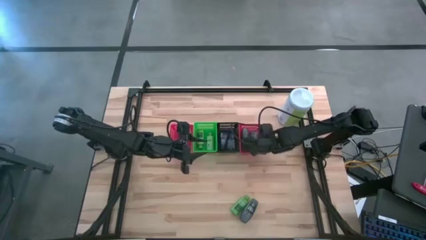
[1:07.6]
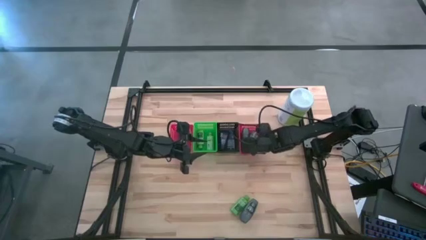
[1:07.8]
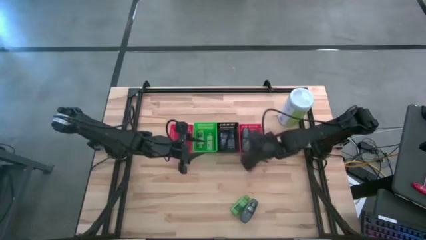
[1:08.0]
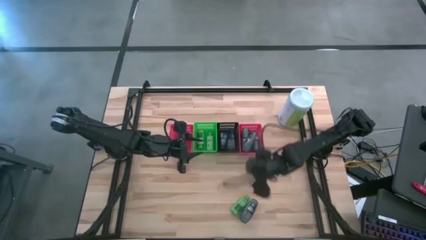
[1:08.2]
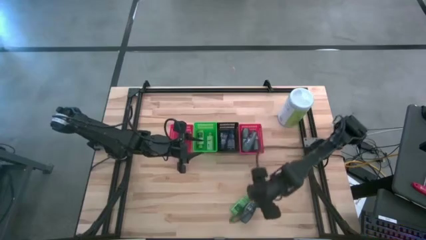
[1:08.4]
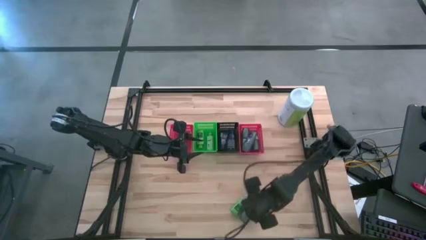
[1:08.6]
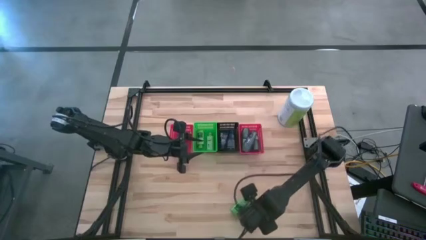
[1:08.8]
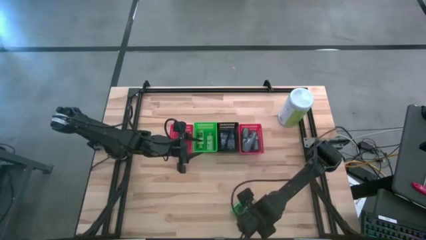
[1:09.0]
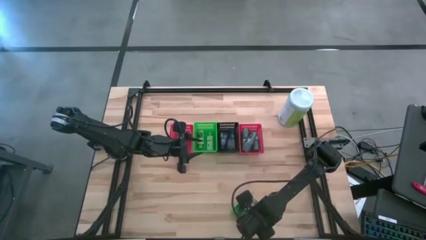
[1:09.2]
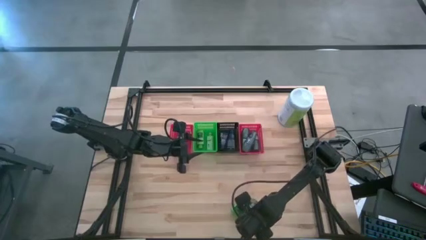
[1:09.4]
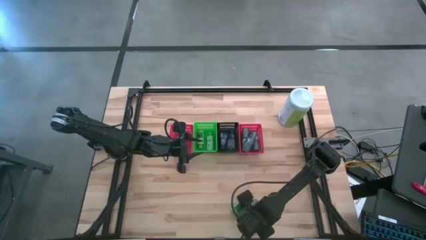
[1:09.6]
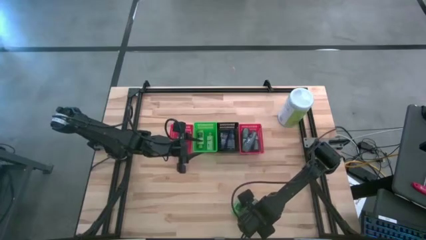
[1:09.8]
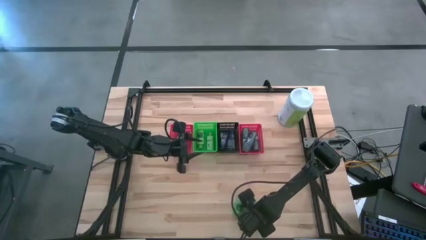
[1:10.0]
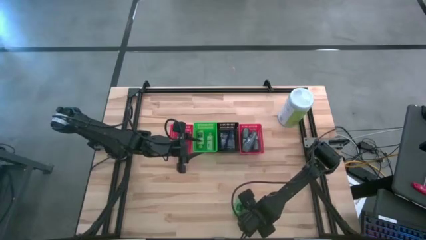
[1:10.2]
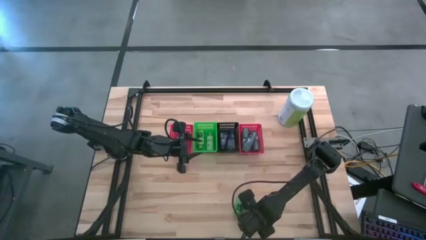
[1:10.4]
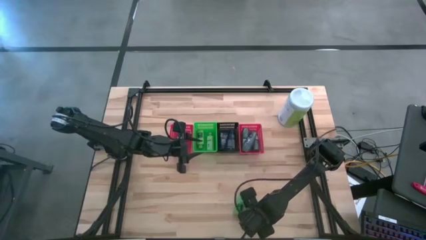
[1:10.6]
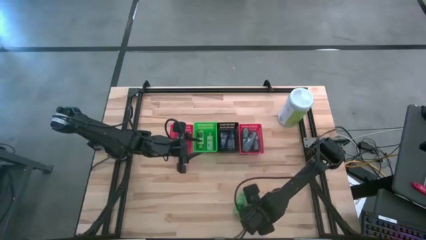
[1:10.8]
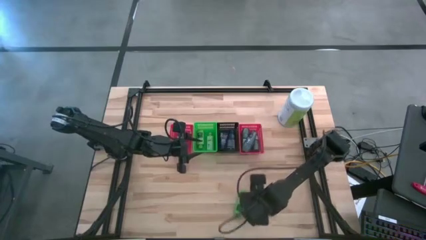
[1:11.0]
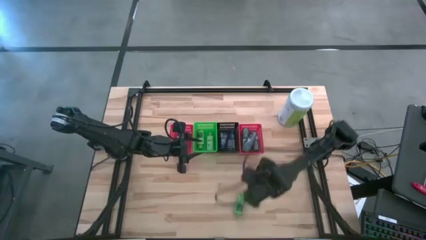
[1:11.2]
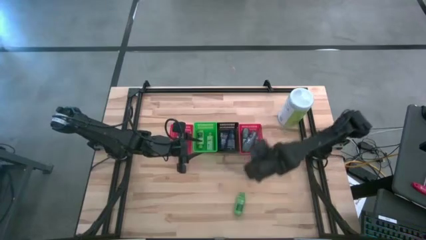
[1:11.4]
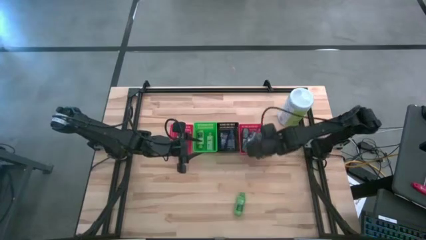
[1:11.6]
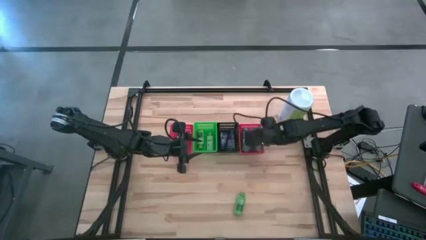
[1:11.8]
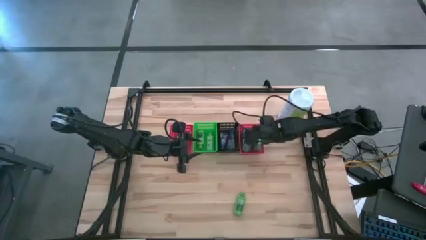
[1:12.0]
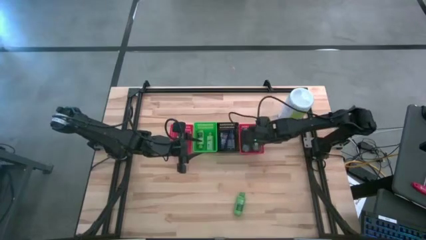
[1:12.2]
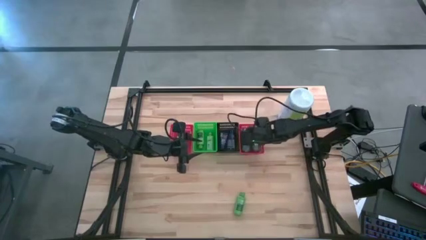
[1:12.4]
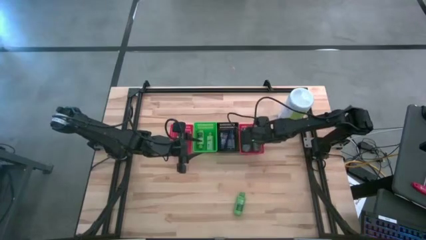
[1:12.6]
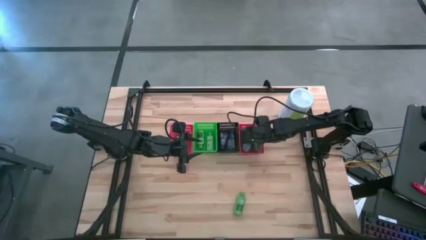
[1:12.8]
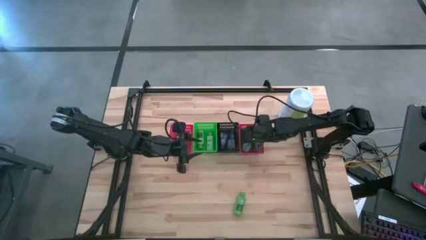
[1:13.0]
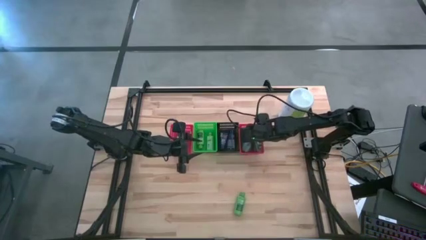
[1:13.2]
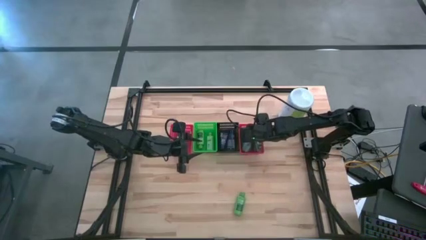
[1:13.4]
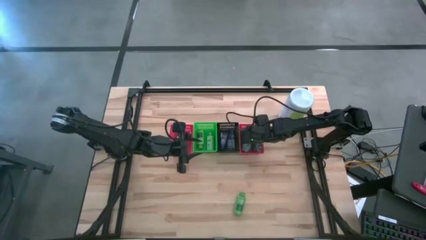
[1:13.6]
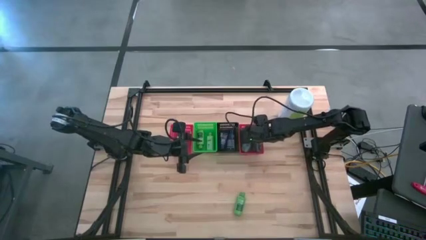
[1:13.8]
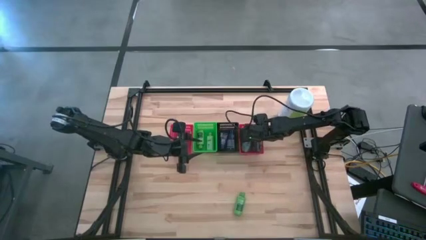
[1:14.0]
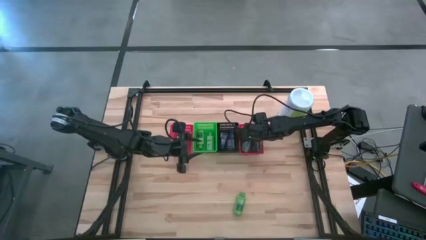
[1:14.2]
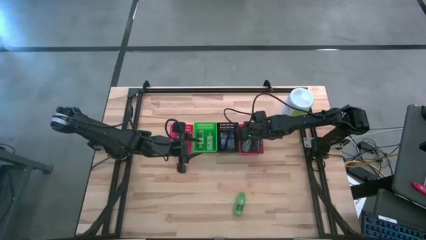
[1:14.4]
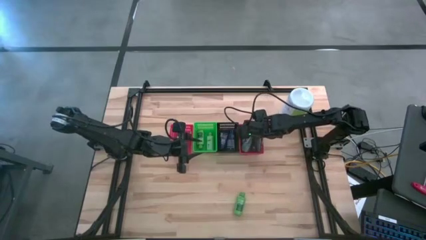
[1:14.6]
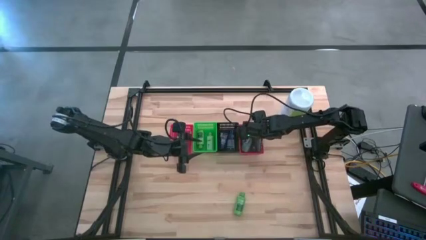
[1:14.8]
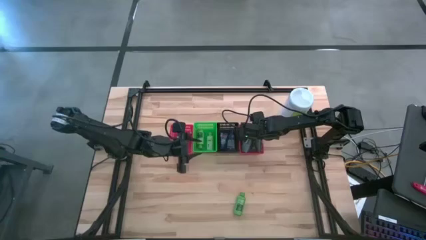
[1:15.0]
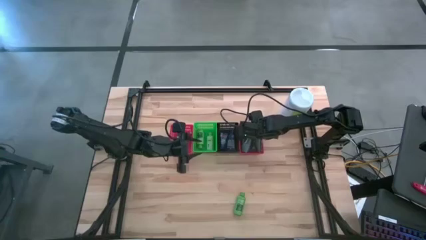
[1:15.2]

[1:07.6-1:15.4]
Task: Pick & Place Travel size toiletries
Put the black deodorant into the right red bin

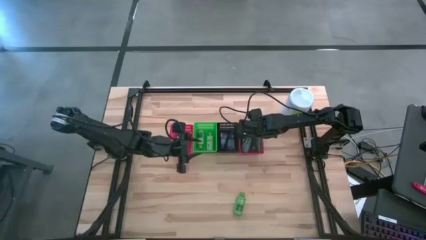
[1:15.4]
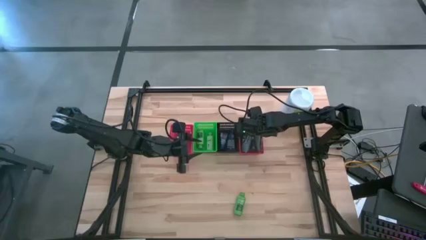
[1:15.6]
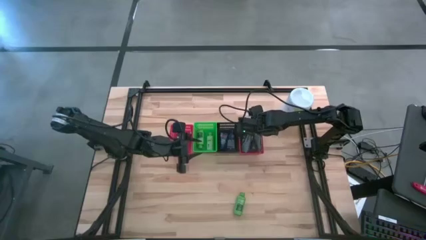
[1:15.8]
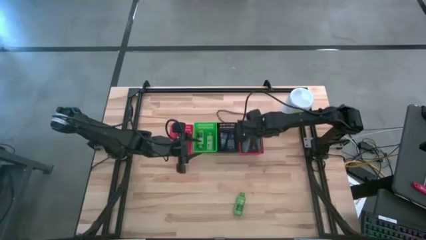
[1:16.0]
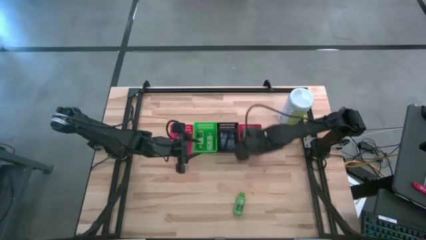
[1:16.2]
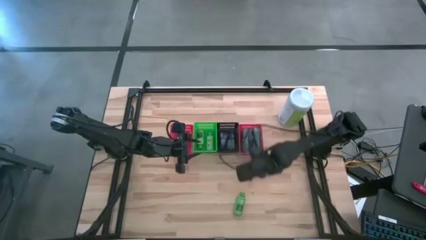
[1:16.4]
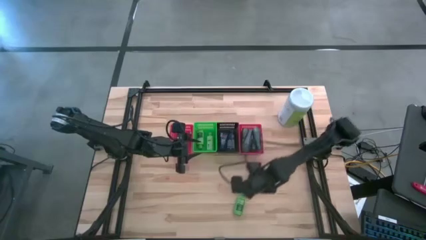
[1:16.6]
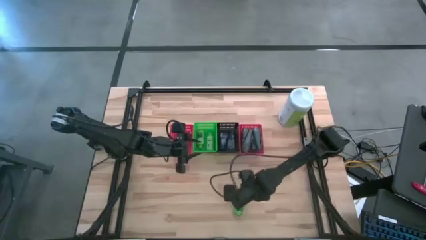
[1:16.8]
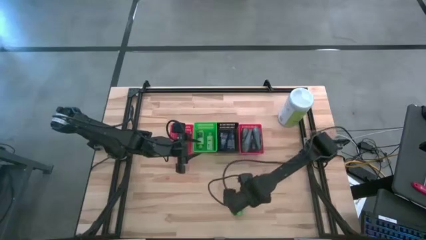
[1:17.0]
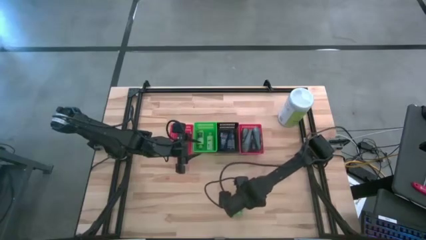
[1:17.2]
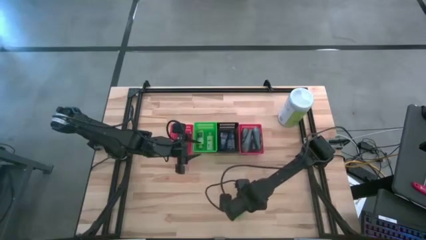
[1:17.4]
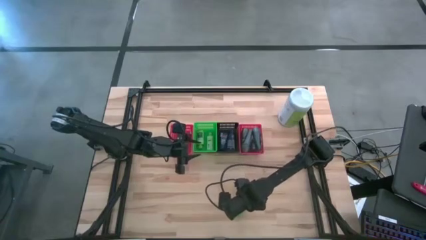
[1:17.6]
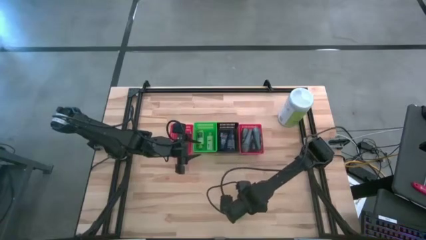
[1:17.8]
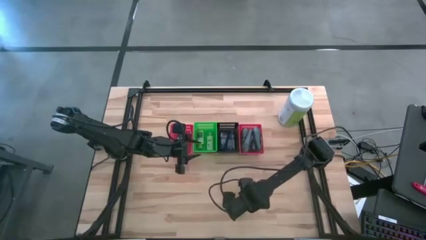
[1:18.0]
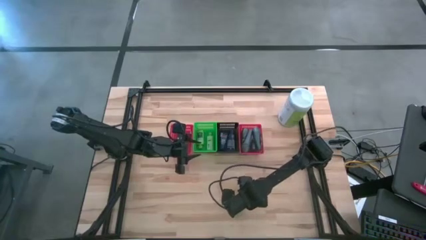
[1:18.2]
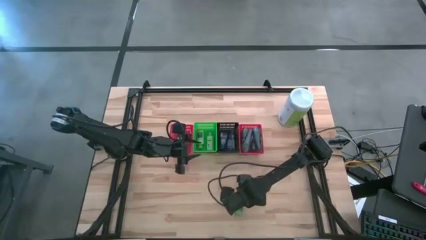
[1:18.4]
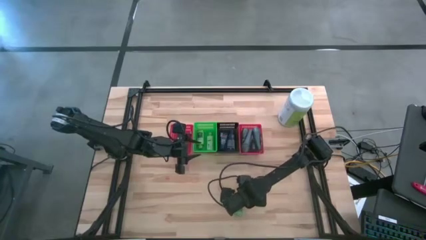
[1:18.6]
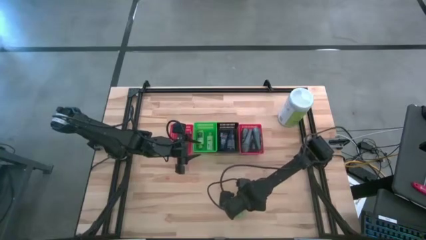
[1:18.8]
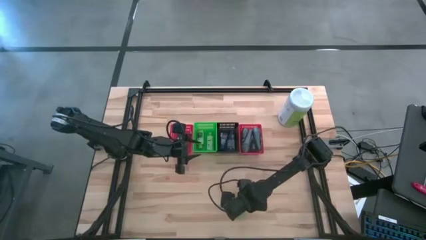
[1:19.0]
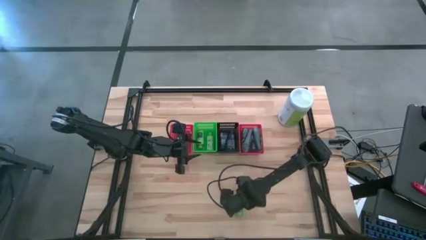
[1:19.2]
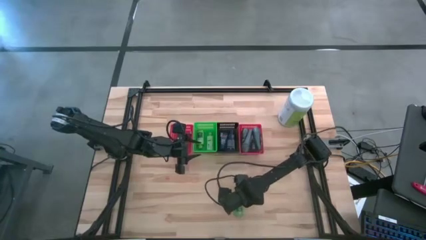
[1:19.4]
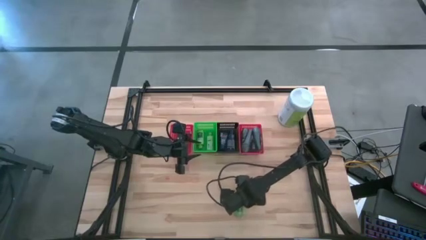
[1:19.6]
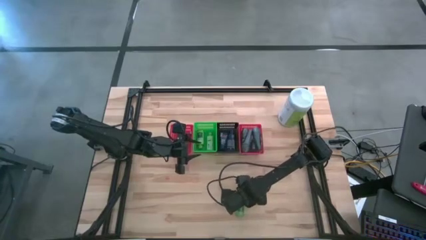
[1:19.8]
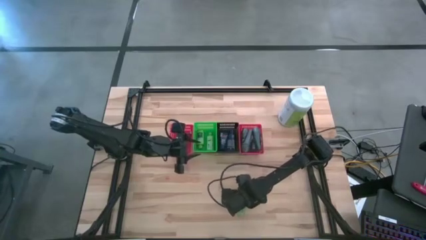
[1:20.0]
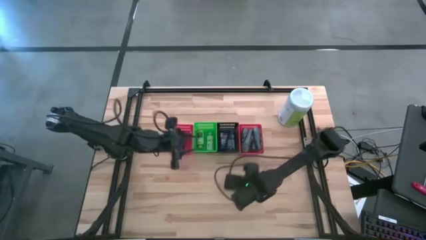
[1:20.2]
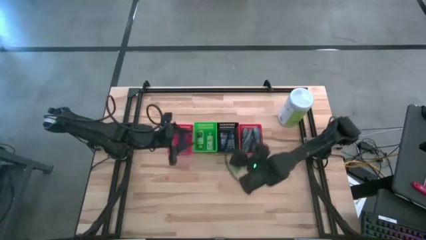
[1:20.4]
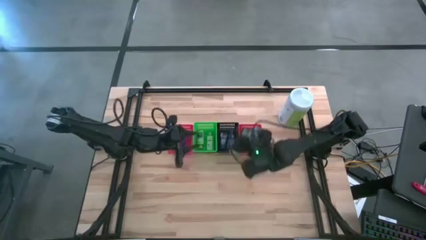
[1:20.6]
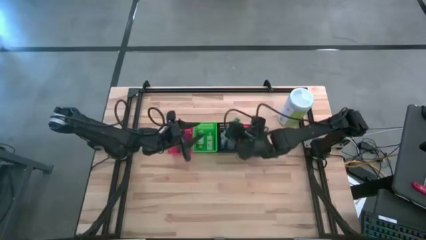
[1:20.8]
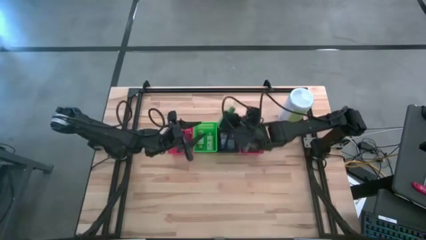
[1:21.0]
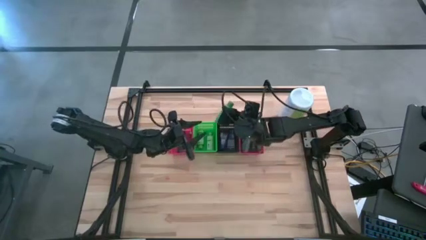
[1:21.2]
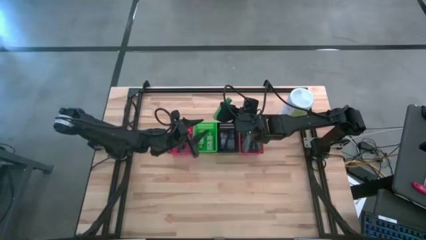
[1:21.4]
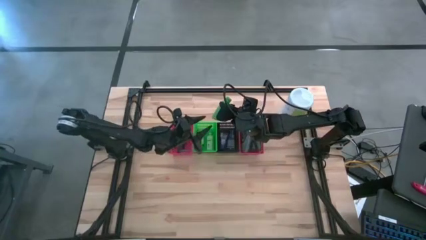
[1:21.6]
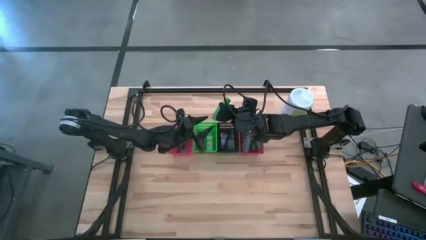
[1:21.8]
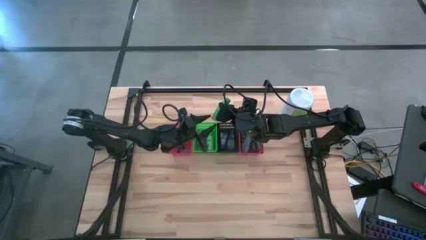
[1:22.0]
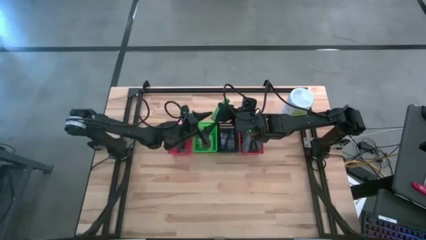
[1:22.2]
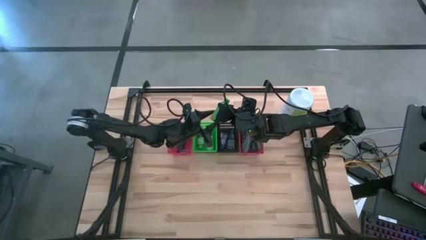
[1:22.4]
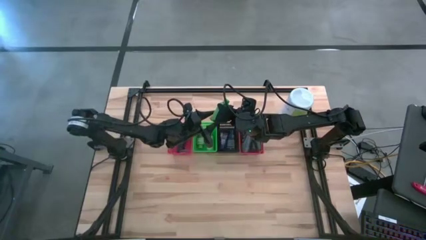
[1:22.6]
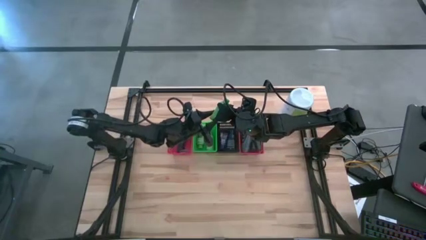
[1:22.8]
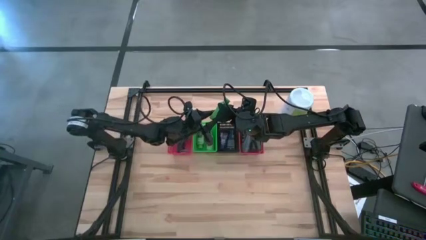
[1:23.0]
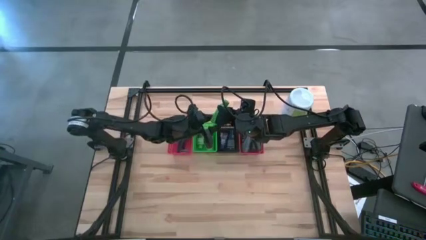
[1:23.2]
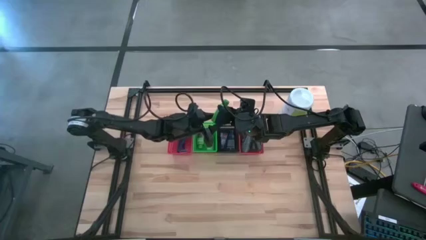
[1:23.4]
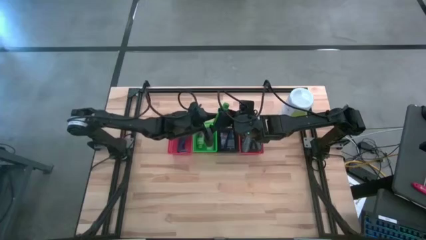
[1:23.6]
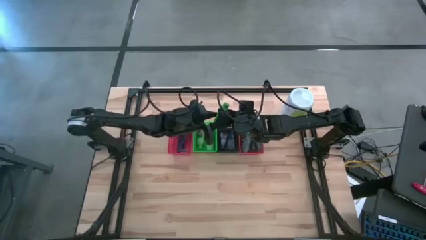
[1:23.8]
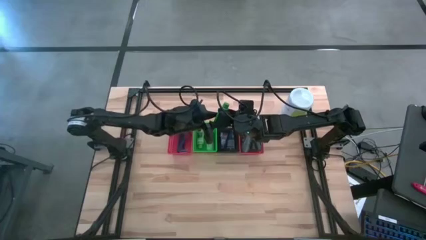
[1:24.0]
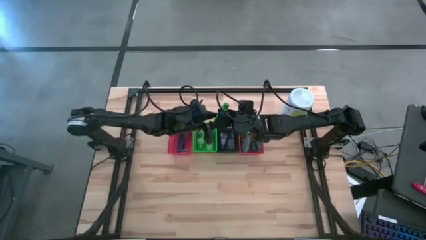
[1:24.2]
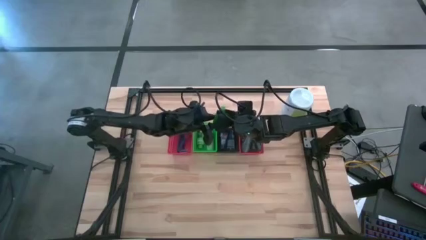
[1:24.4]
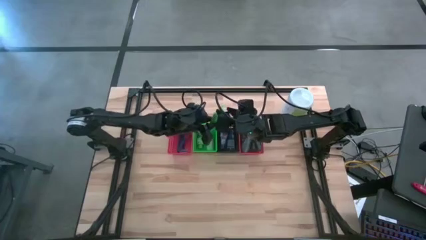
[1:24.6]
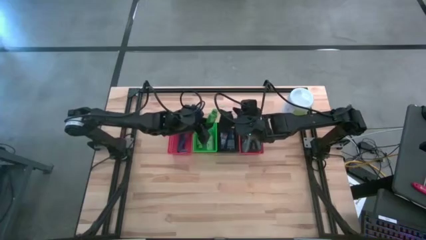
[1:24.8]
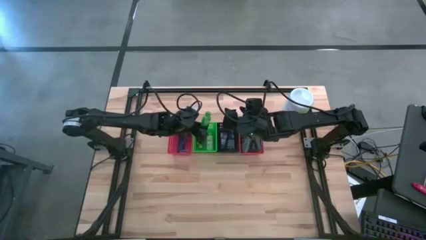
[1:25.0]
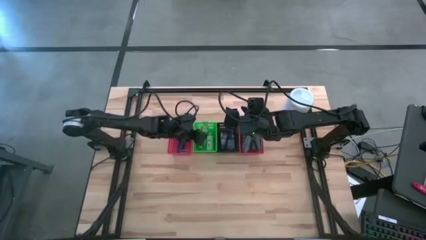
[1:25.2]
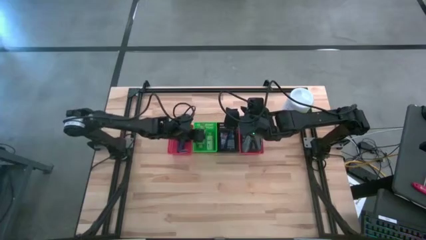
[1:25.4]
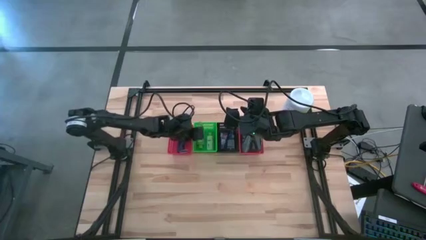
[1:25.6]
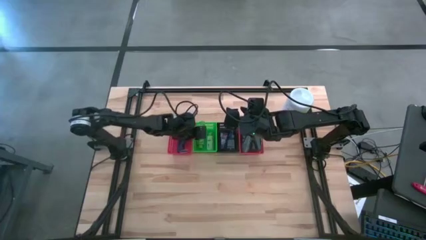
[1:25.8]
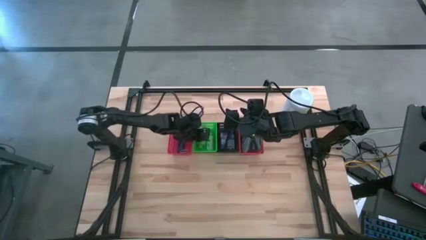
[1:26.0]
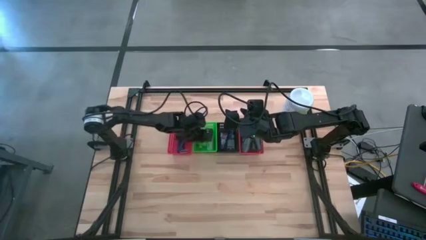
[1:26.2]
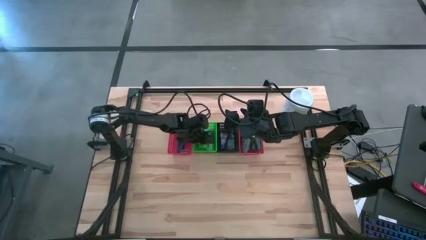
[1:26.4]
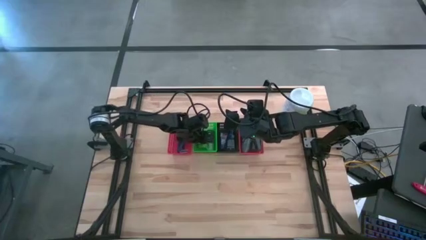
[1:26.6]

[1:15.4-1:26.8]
Put the green shampoo into the green bin
